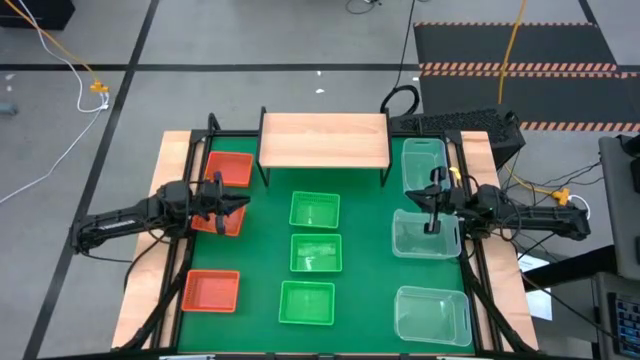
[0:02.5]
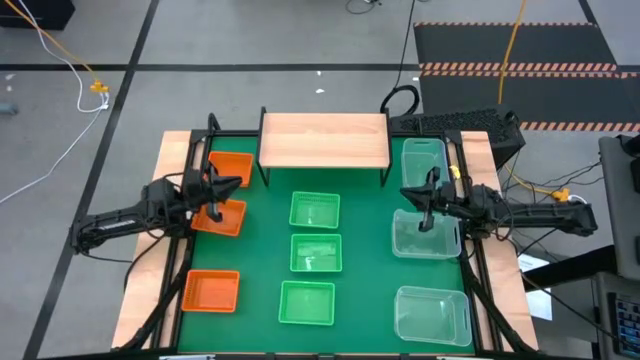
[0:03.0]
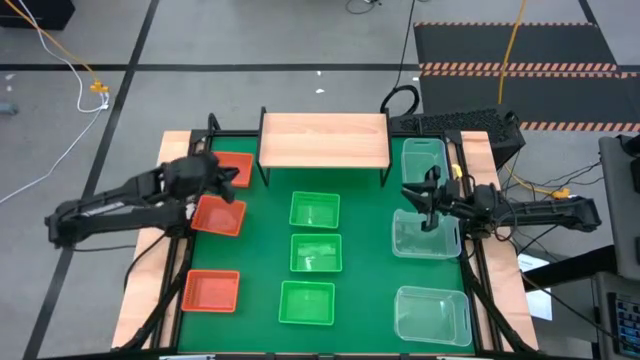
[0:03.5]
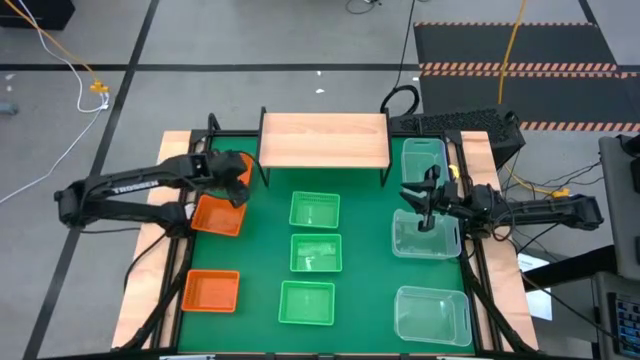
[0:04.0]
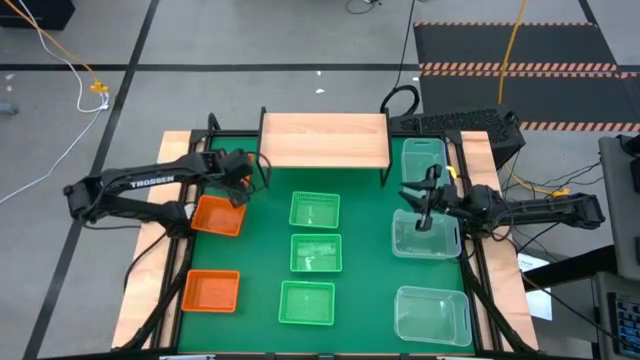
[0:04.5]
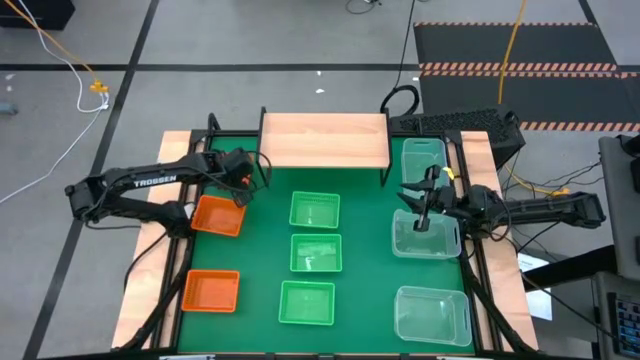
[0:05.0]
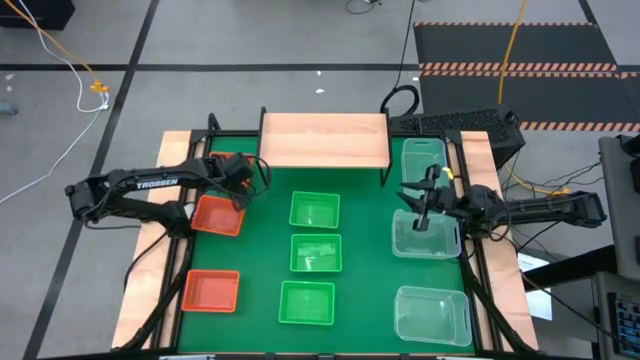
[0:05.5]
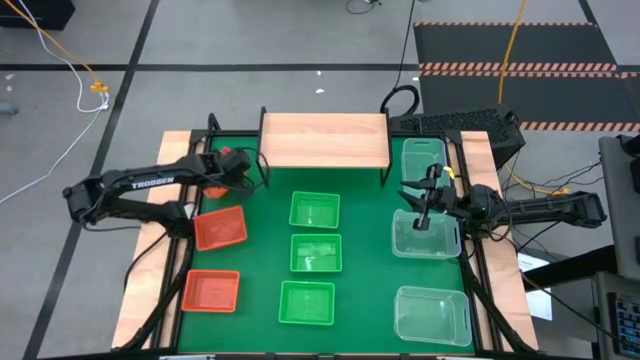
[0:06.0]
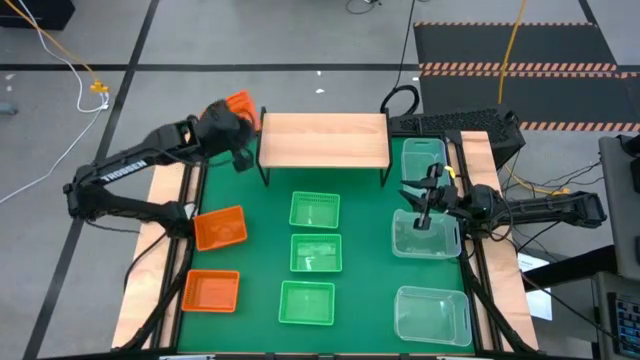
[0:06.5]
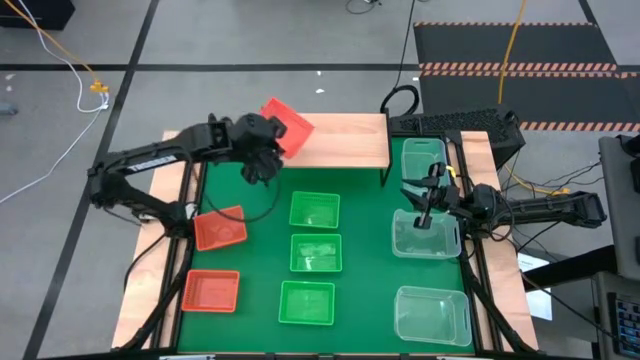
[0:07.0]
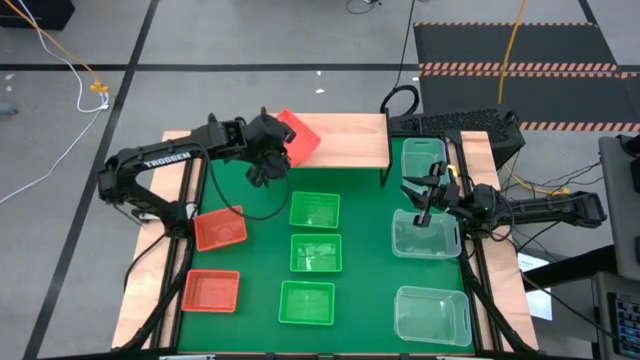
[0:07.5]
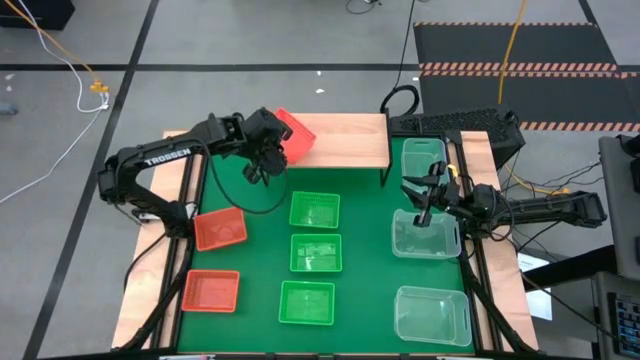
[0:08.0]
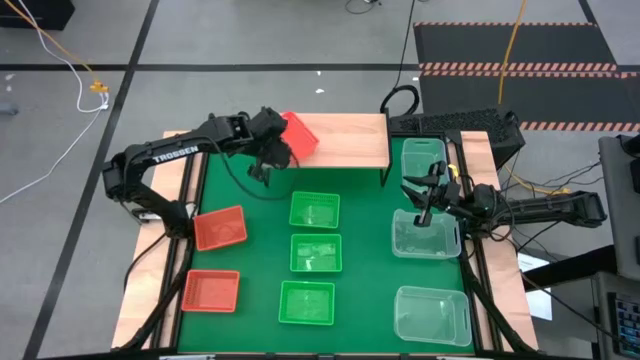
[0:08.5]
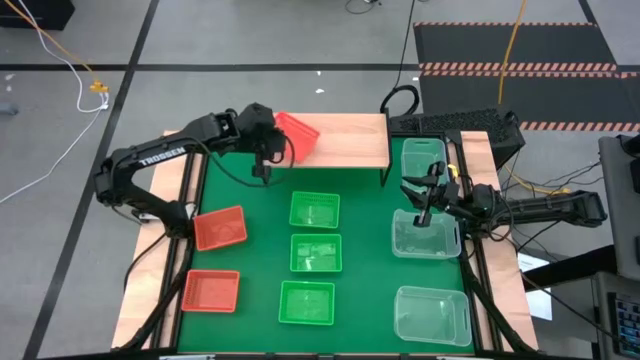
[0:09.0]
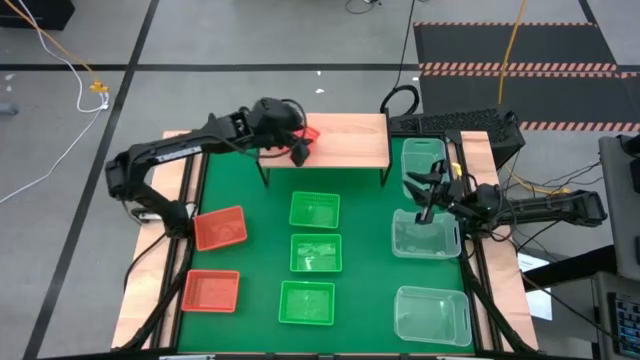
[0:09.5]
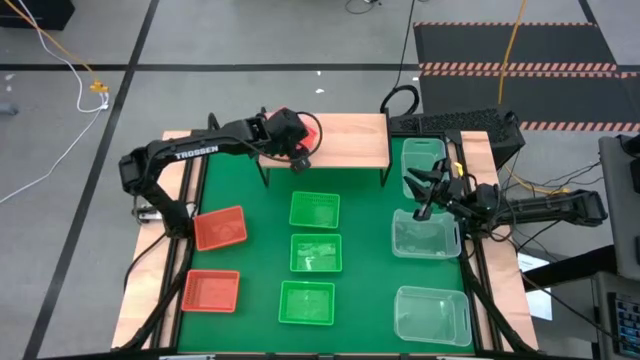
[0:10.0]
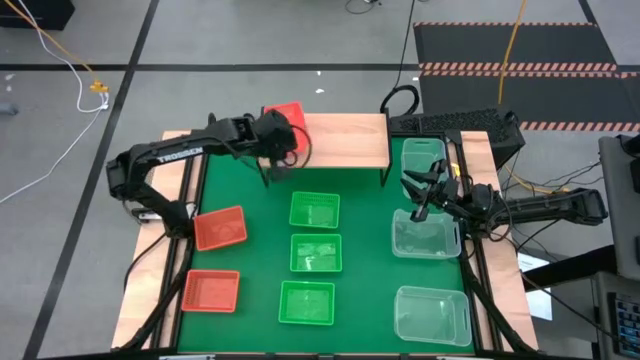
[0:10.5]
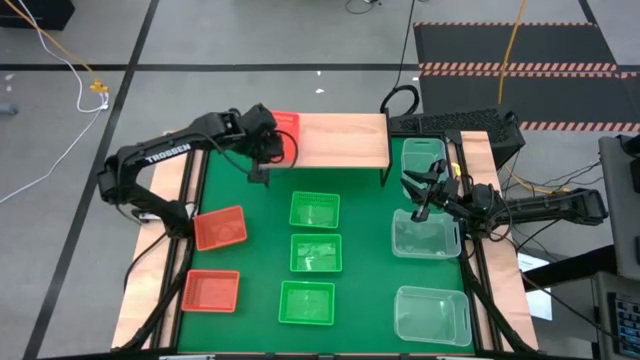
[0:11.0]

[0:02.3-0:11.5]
Task: Stack baskets on shelf by color
Put the top orange bin on the shelf

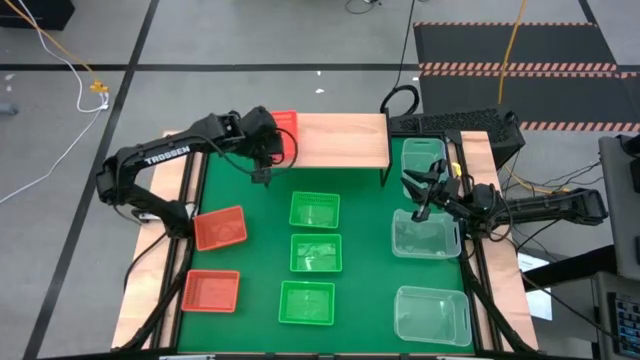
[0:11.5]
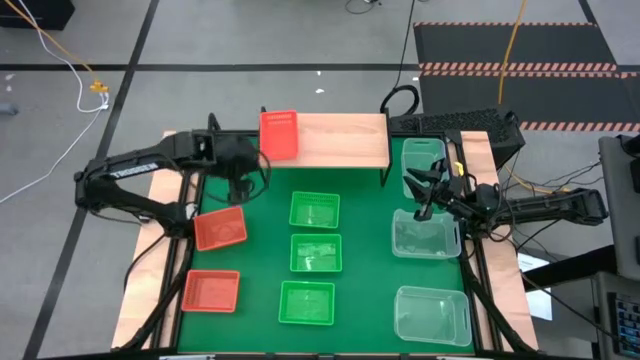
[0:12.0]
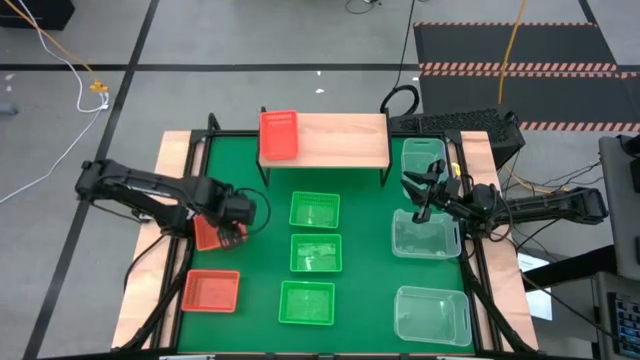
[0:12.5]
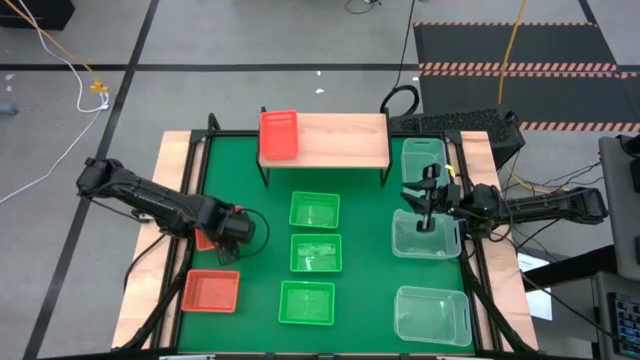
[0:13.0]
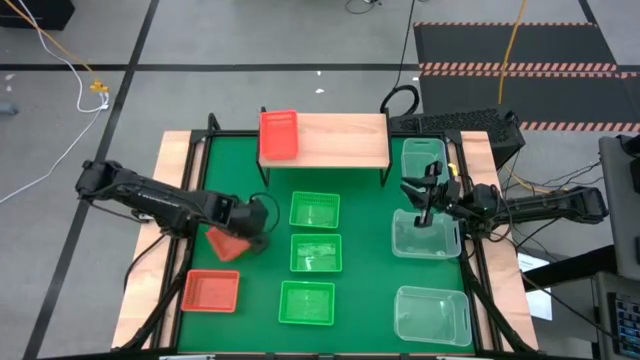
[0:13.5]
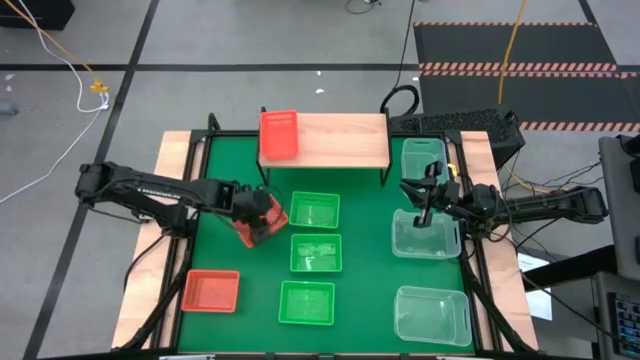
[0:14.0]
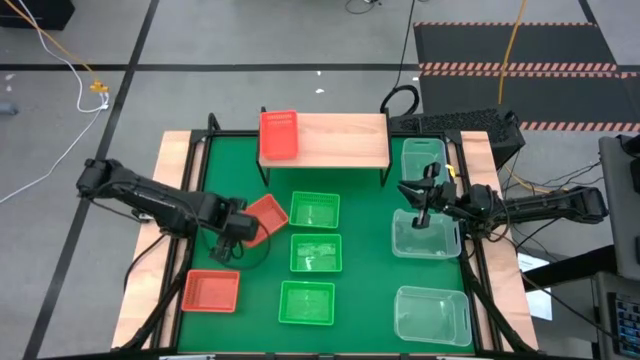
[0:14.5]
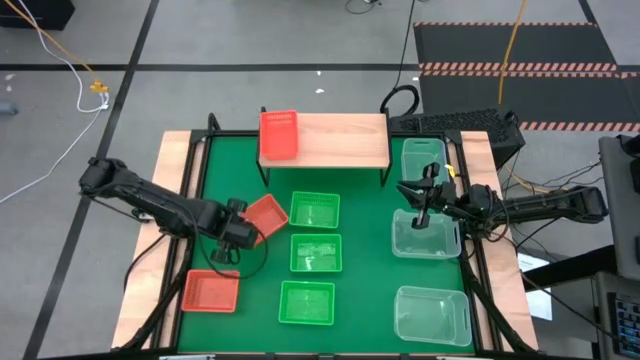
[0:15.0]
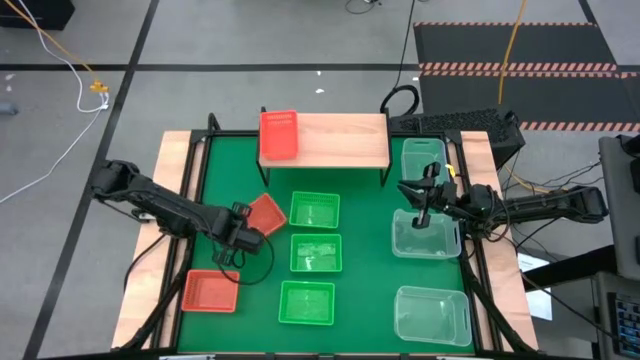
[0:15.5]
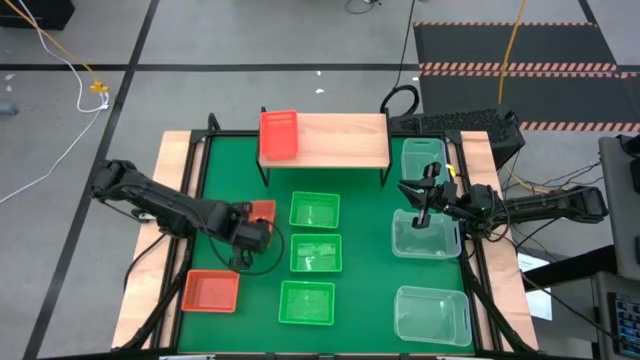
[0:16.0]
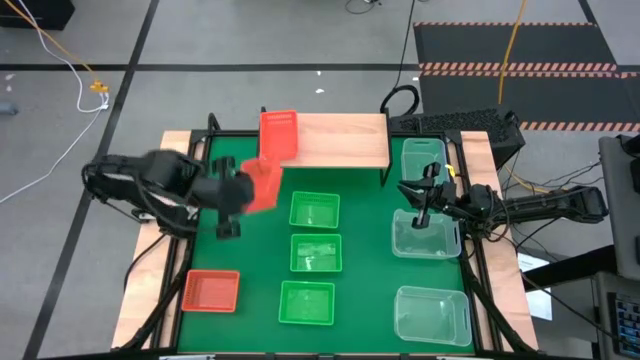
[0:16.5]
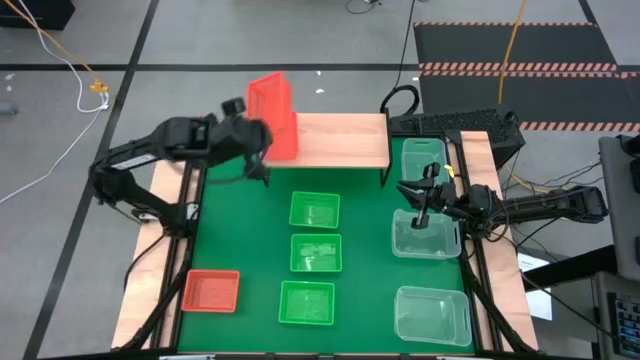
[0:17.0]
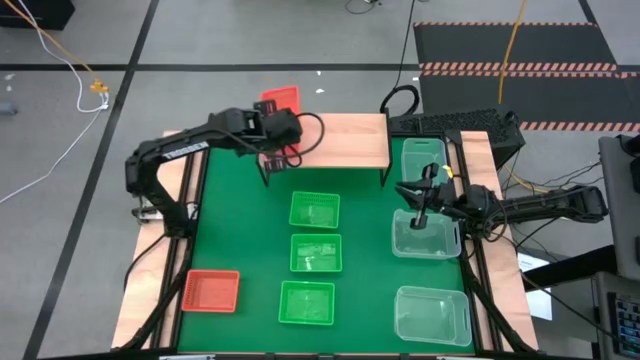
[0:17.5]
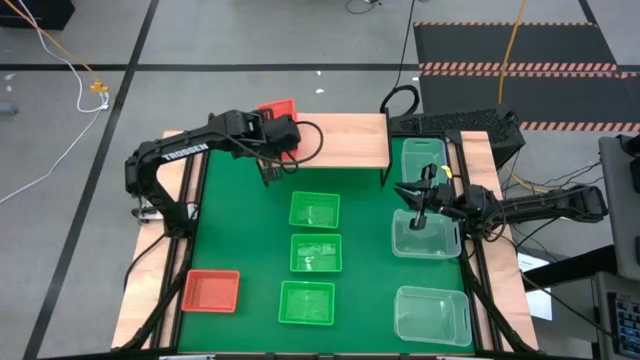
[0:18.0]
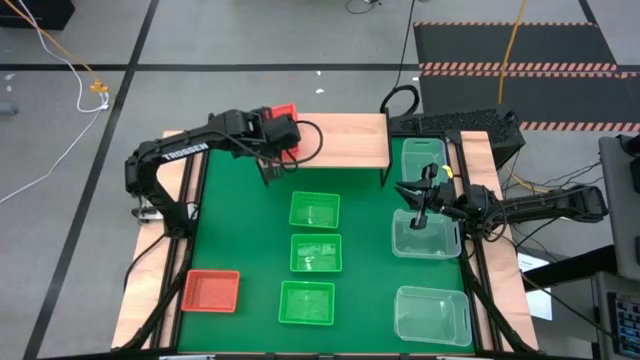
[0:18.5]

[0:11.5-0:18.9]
Stack the top orange bin on the orange bin on the shelf

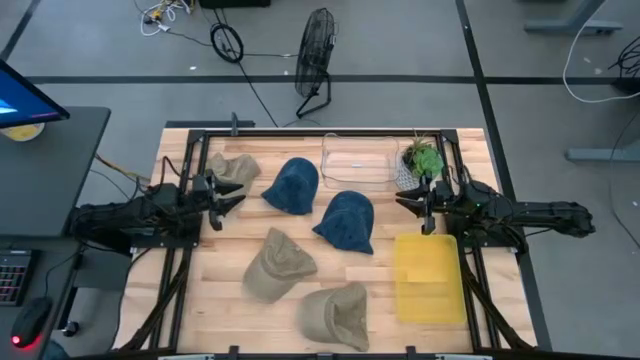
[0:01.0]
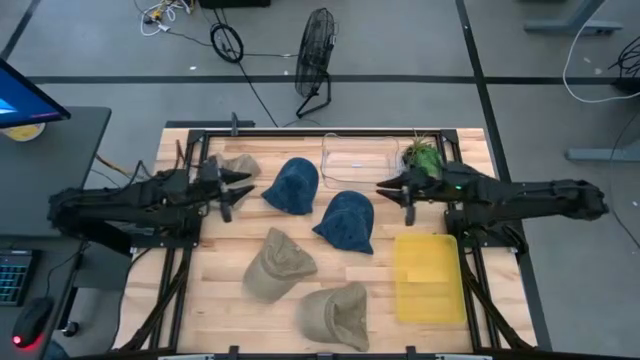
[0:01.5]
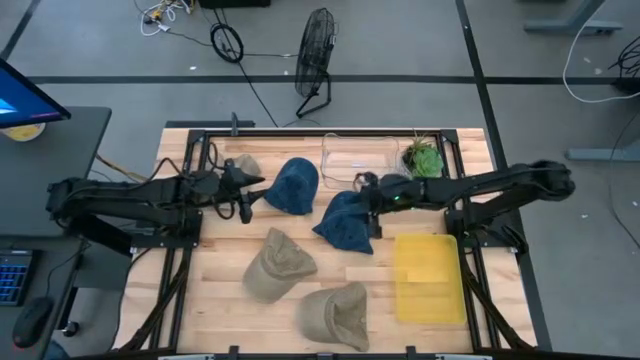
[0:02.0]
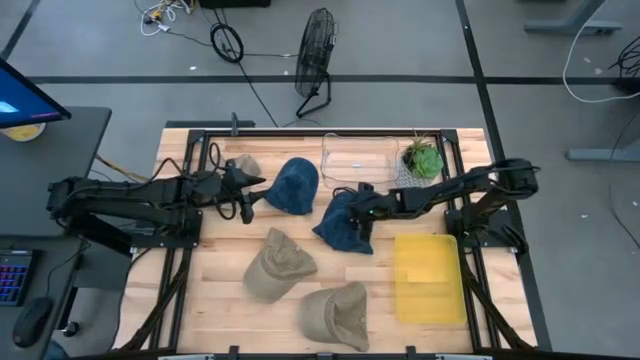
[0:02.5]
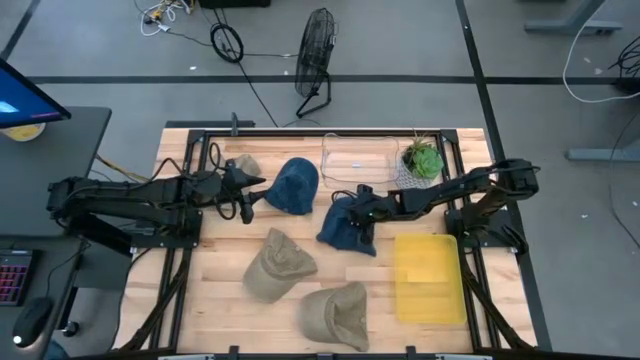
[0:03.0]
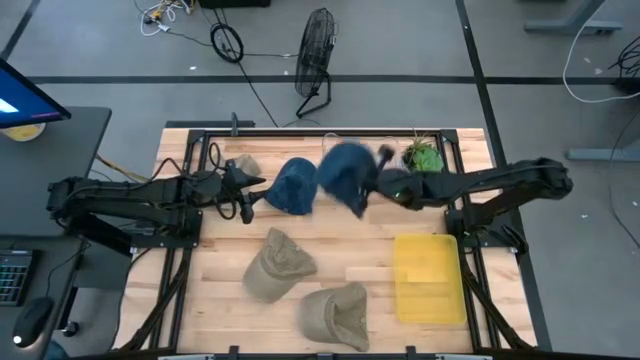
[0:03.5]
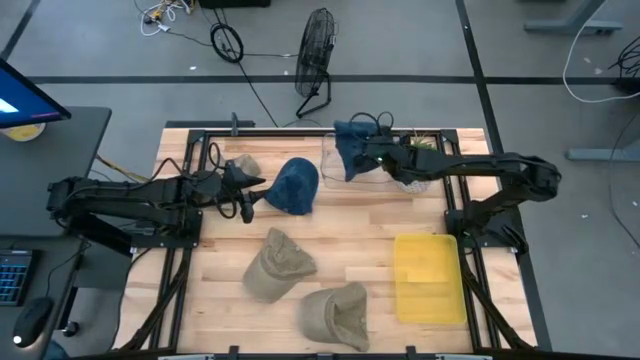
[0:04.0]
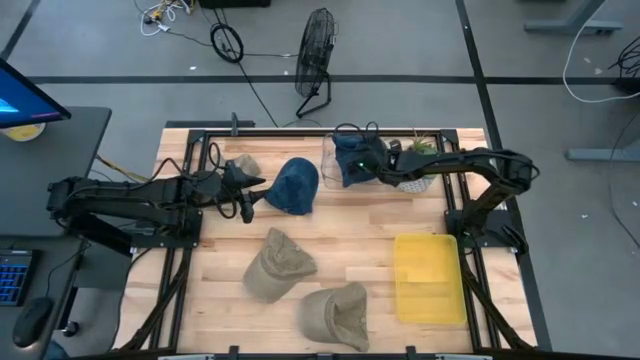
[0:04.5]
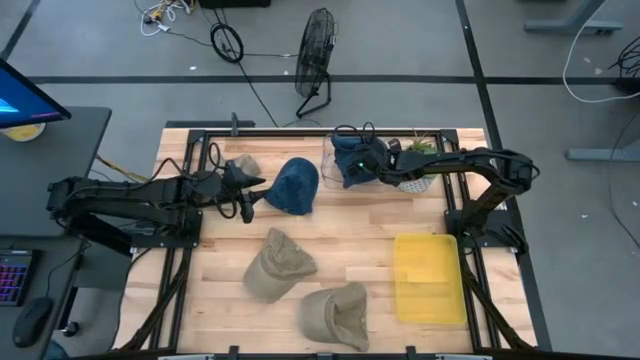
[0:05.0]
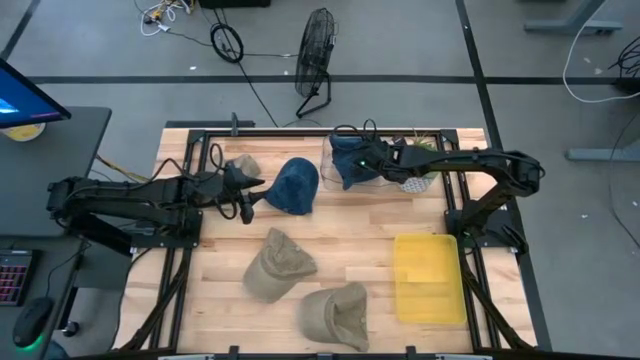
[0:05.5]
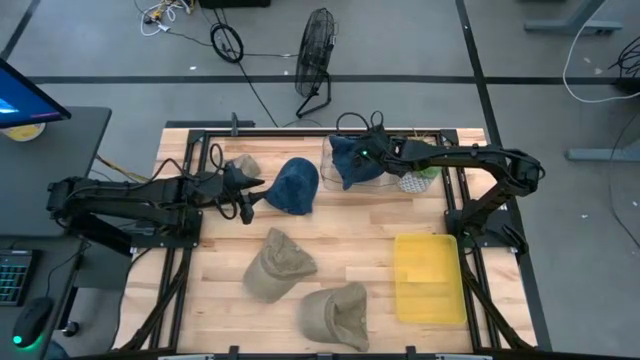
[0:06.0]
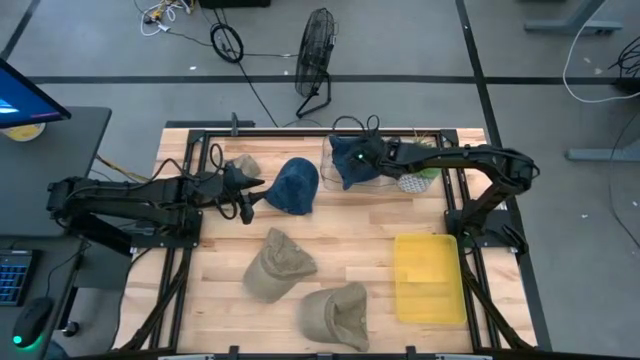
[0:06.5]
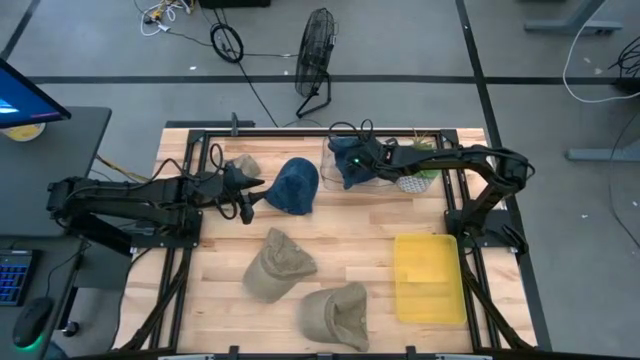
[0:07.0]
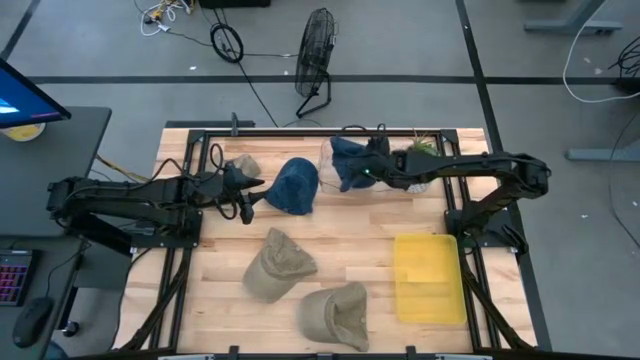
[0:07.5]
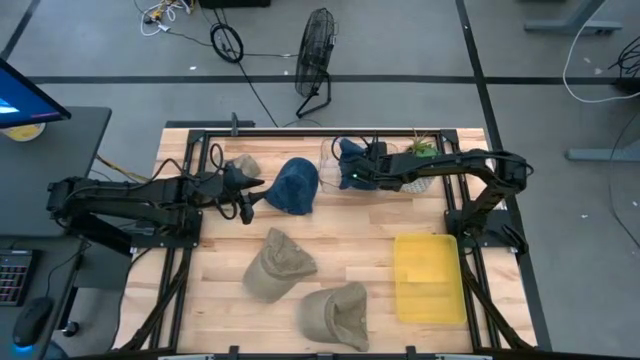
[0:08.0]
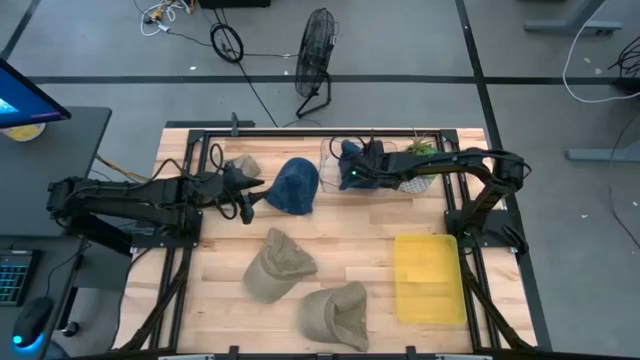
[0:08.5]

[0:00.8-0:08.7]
Task: Pick & Place hat
Put the right blue cap into the transparent bin
